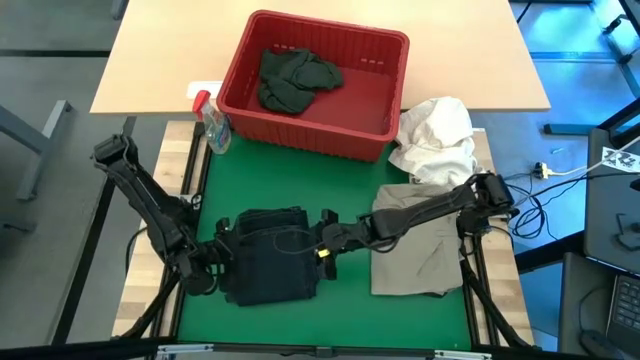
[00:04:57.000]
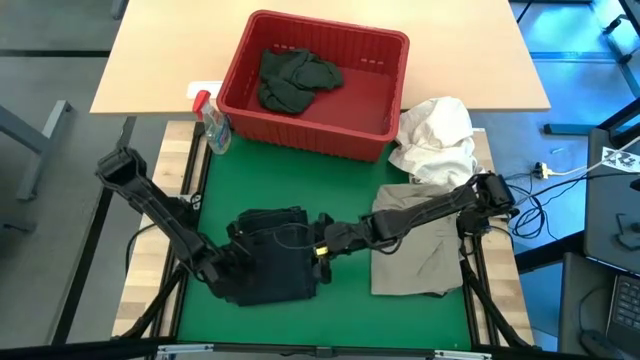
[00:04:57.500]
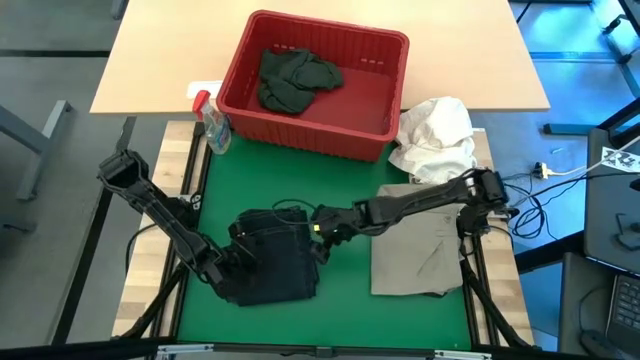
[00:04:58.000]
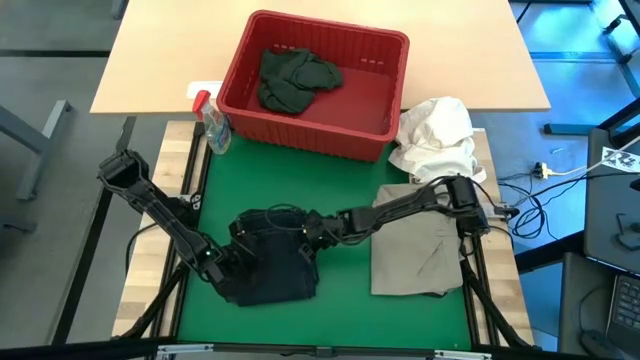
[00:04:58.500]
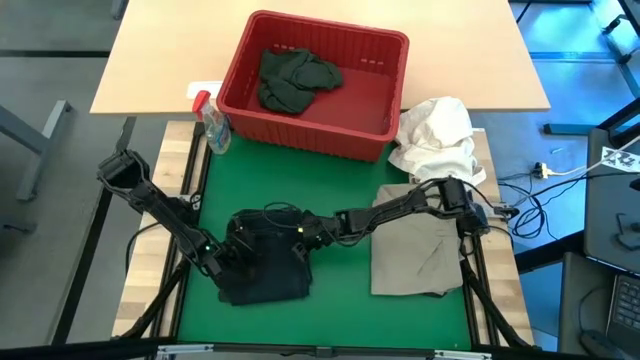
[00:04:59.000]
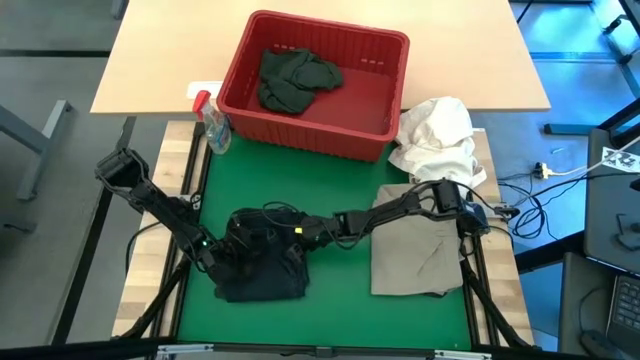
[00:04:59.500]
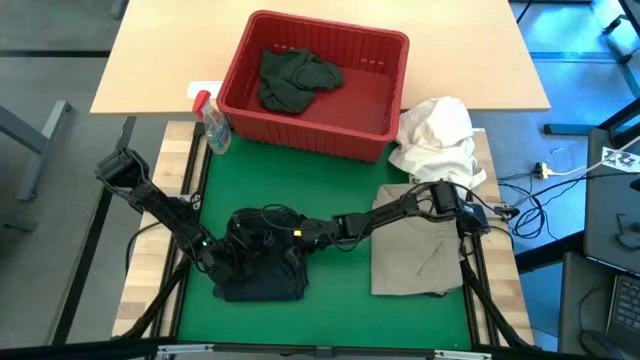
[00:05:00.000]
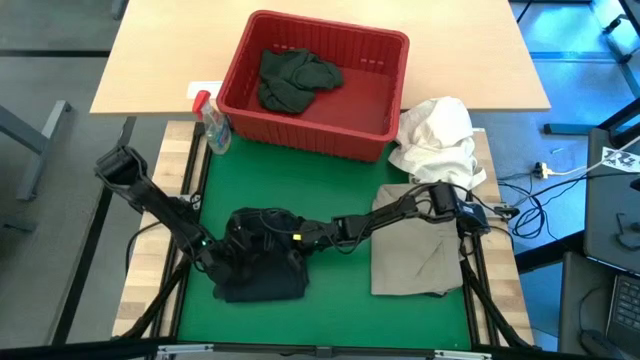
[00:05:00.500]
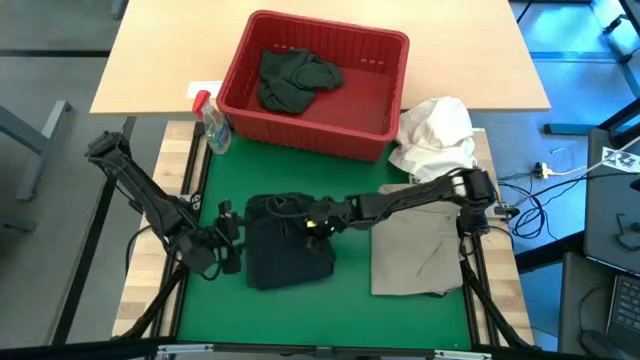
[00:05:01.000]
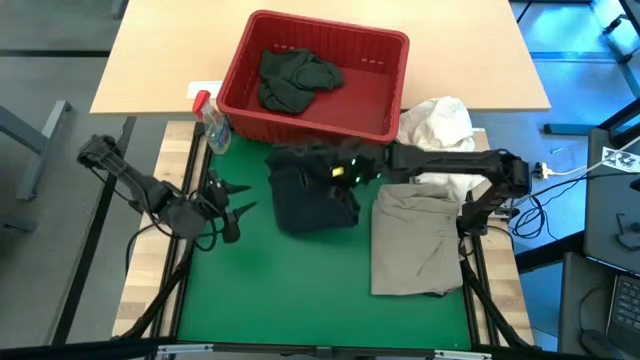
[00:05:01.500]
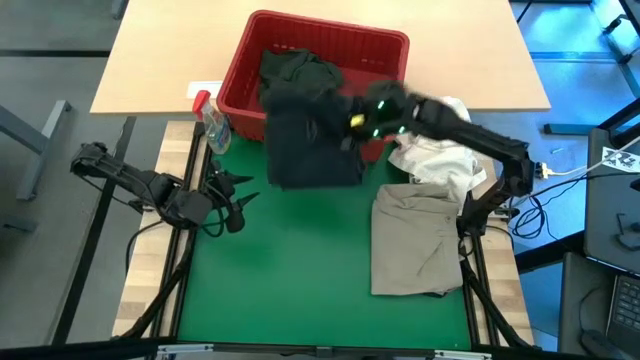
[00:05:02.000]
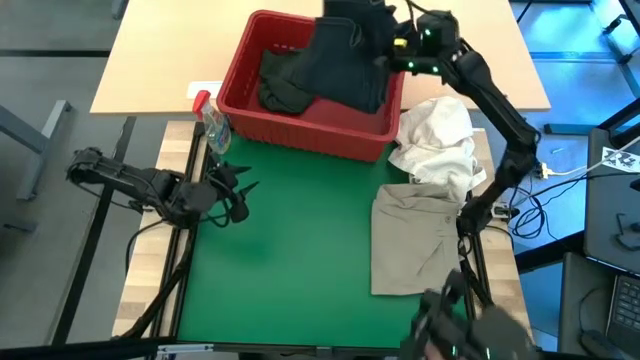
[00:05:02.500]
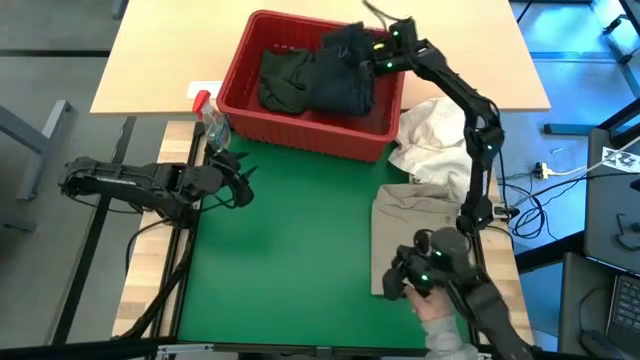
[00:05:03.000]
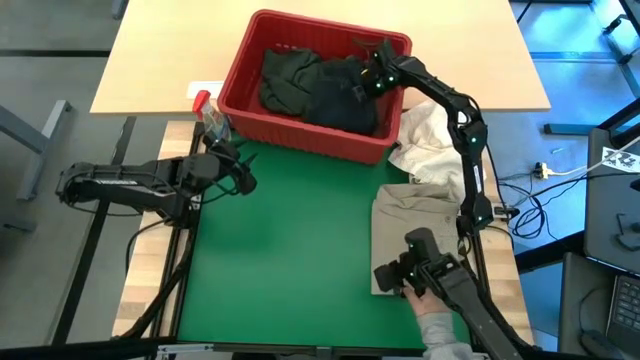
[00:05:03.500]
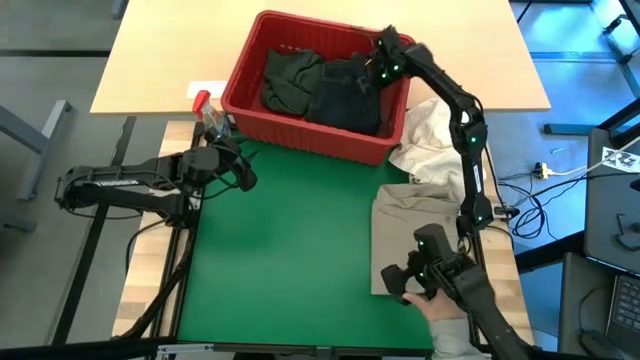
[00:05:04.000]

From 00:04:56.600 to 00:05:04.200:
Task: Fold Laundry from Bin
Fold the blue pants into the red laundry bin

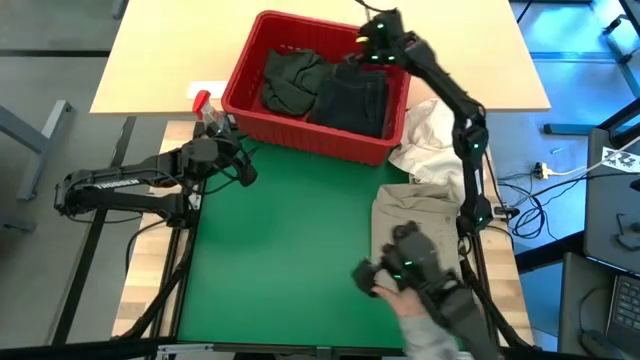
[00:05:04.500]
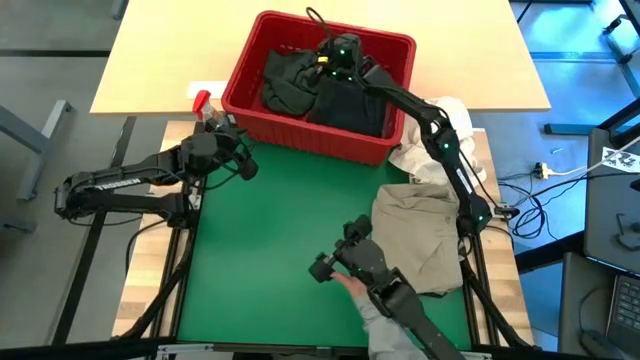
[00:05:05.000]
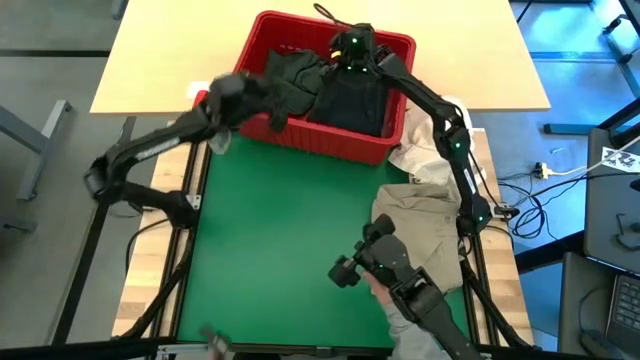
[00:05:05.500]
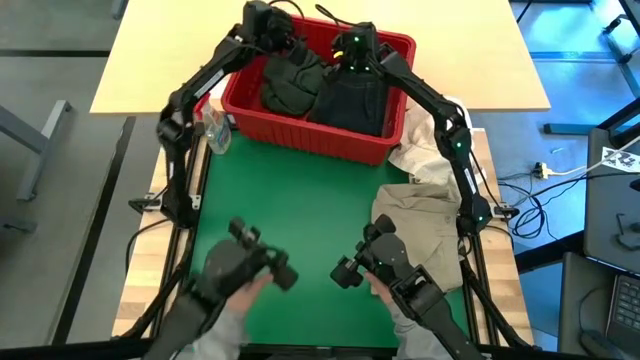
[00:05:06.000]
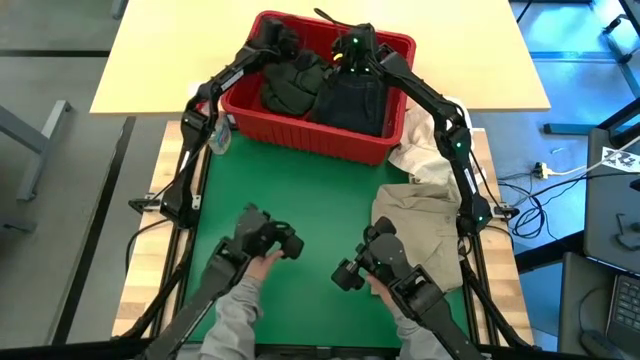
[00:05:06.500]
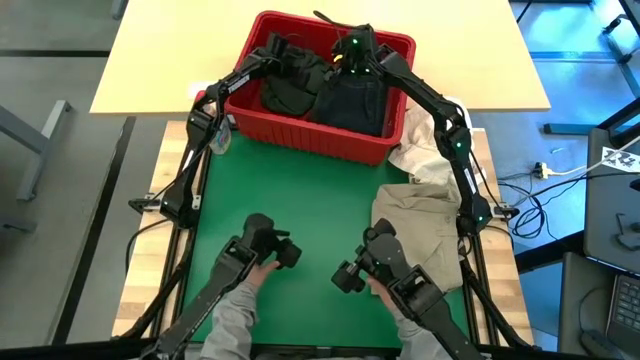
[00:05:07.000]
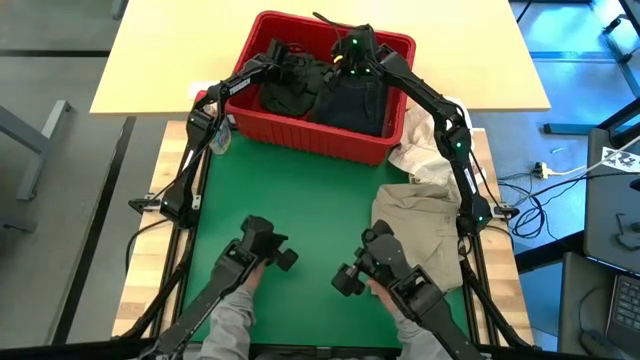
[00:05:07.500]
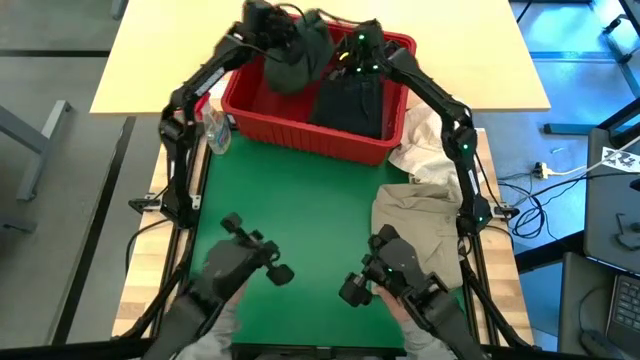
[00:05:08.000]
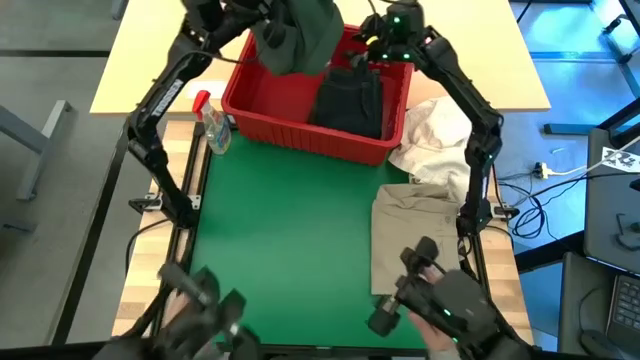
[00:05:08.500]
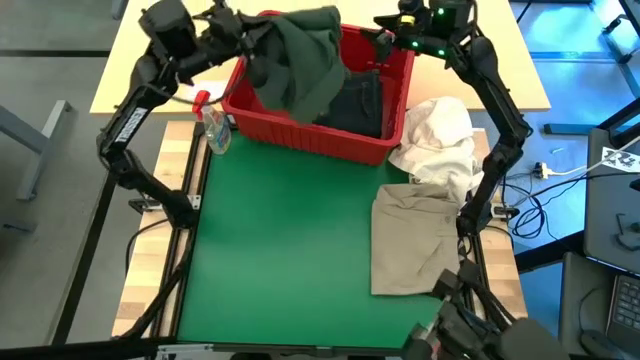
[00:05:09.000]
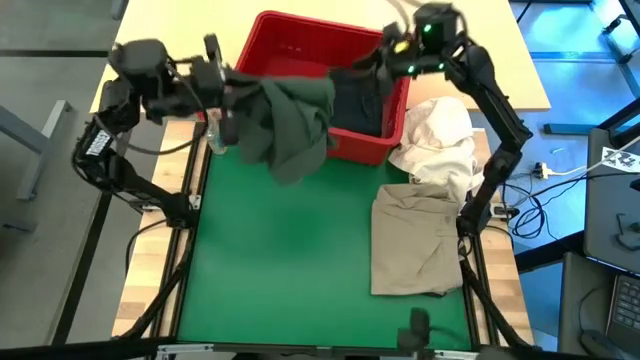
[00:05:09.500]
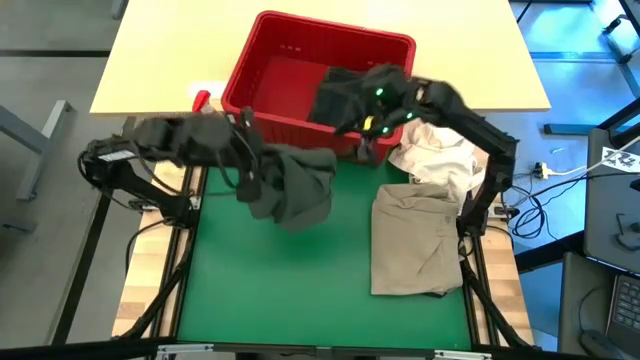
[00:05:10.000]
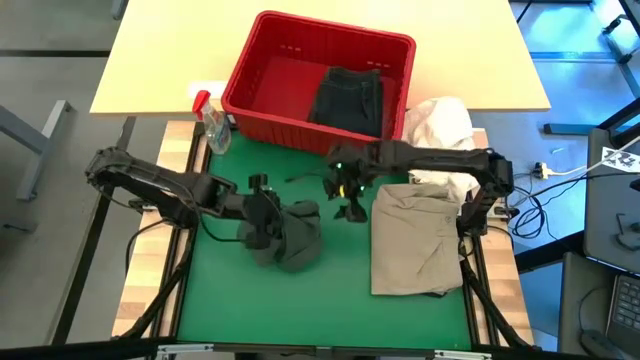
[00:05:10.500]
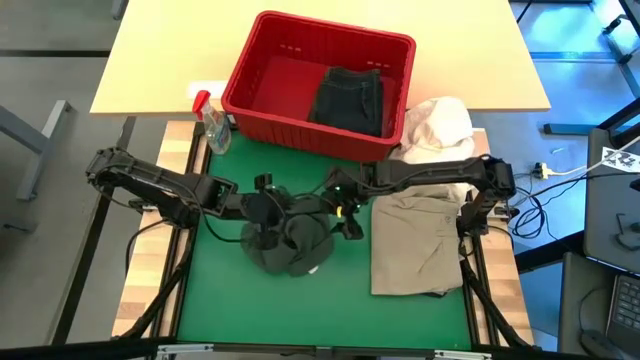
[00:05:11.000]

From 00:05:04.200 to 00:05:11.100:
Remove the green polo shirt from the red laundry bin

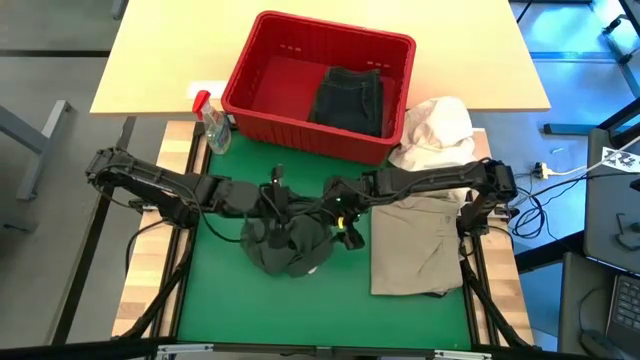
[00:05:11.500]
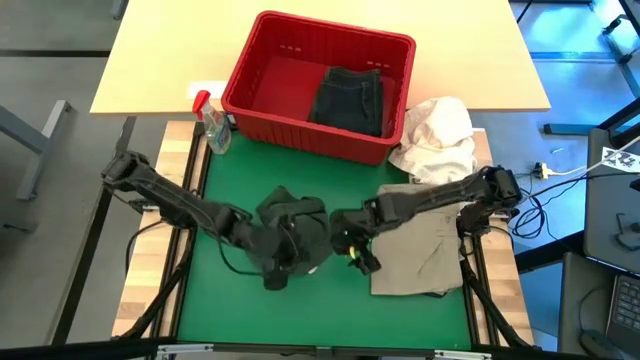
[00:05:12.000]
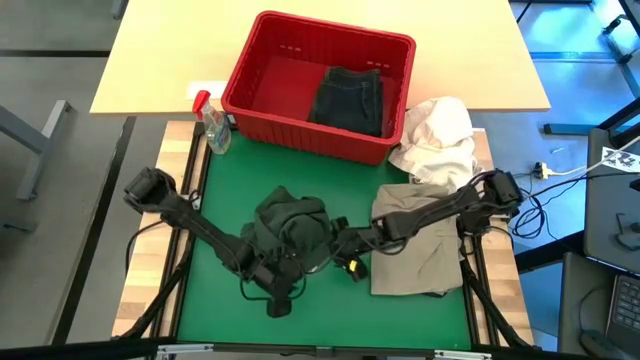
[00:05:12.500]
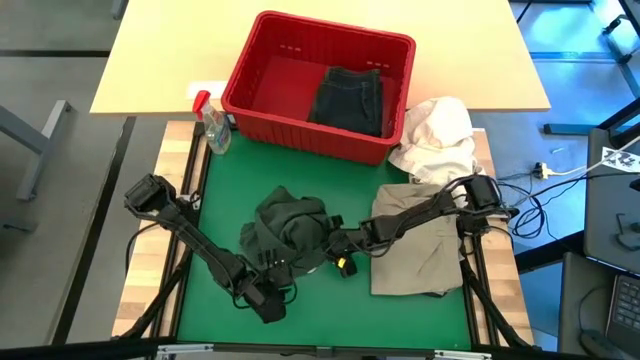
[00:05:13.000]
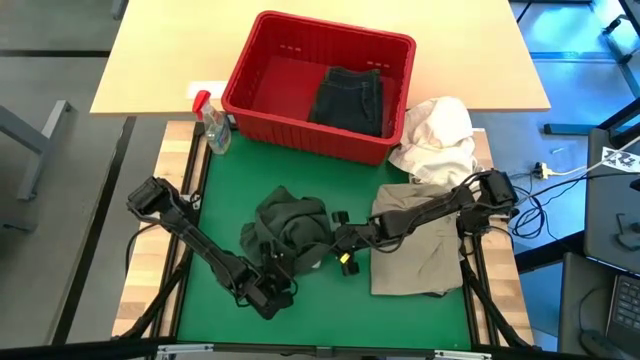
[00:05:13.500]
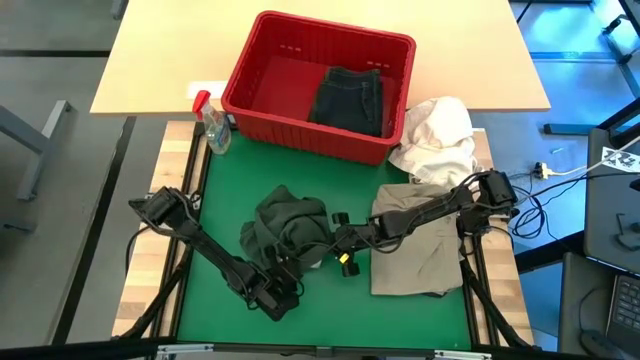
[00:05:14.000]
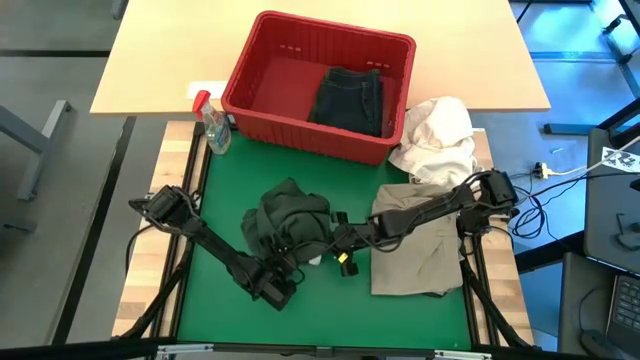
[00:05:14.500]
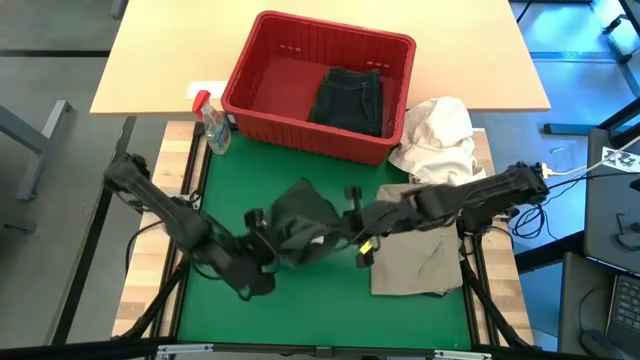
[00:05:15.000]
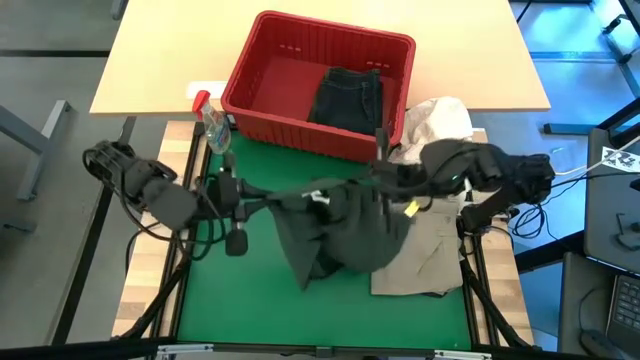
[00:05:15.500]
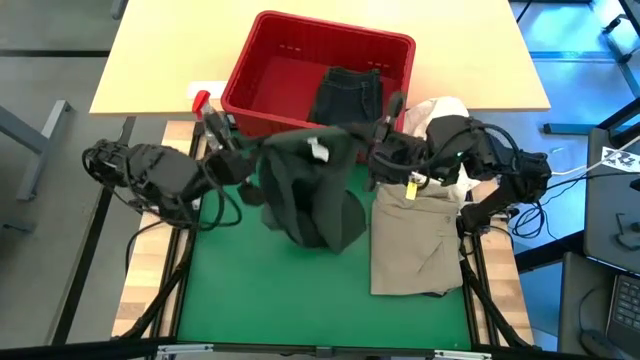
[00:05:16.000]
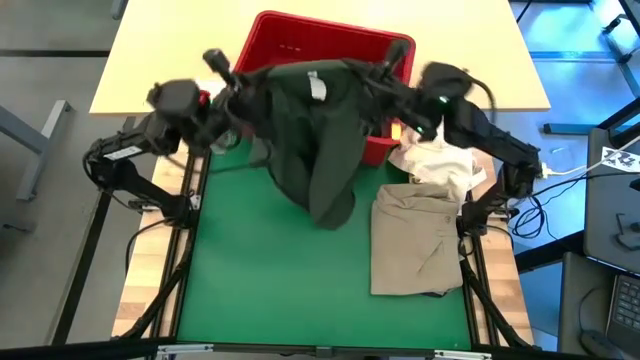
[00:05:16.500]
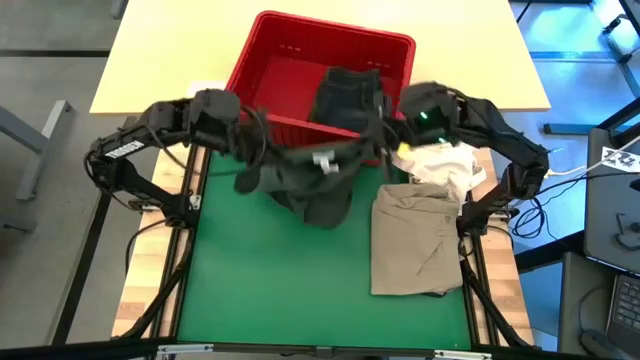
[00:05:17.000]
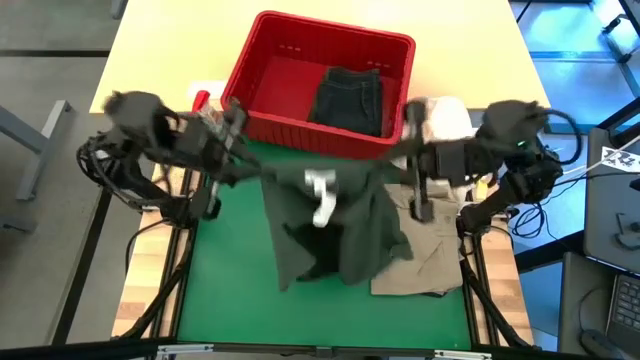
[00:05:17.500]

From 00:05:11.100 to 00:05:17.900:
Fold the green polo shirt
